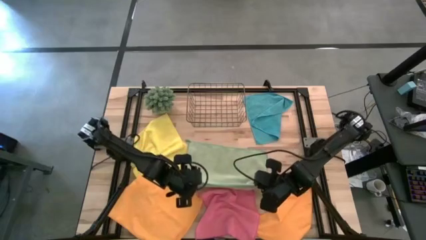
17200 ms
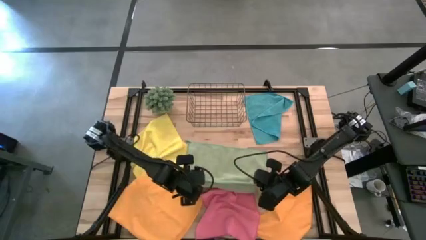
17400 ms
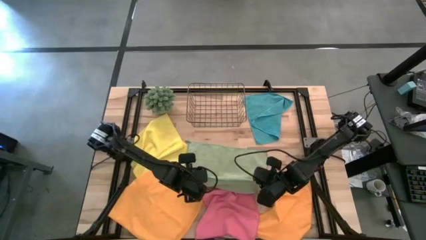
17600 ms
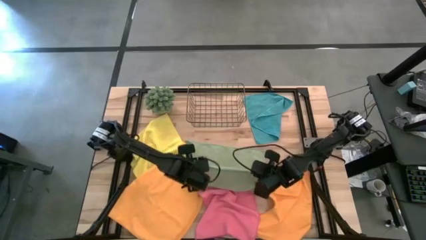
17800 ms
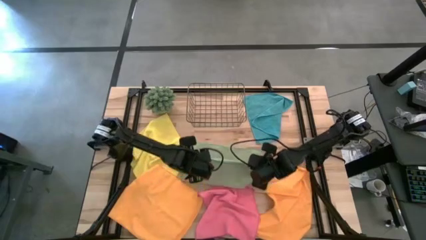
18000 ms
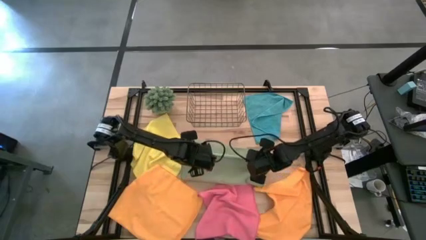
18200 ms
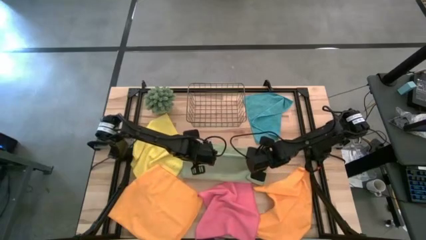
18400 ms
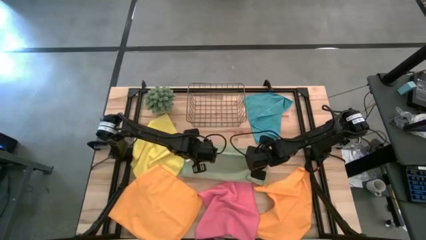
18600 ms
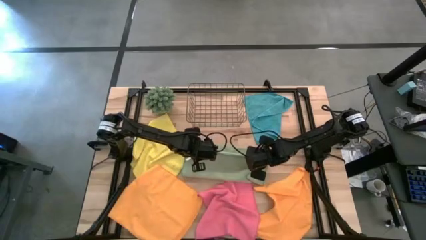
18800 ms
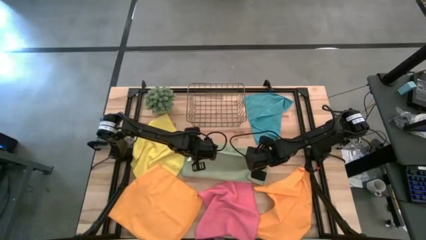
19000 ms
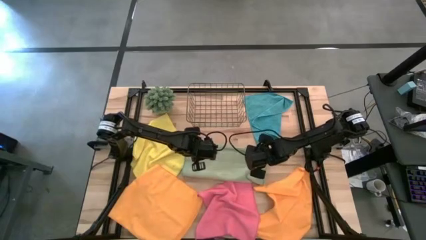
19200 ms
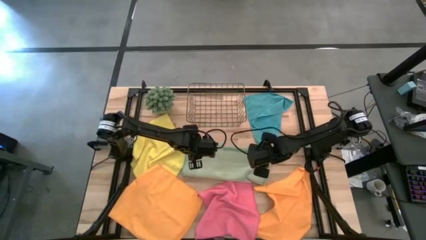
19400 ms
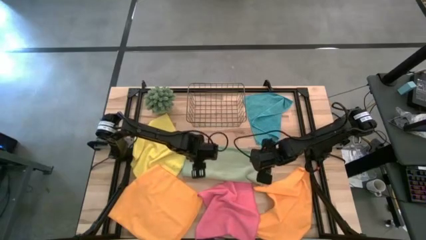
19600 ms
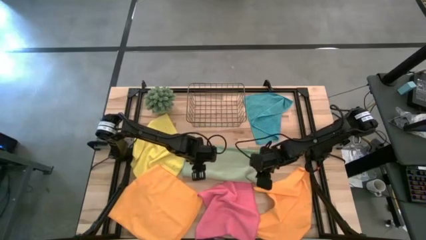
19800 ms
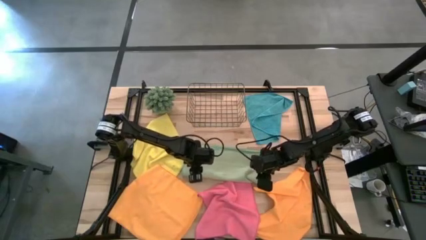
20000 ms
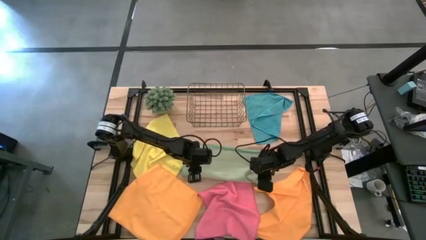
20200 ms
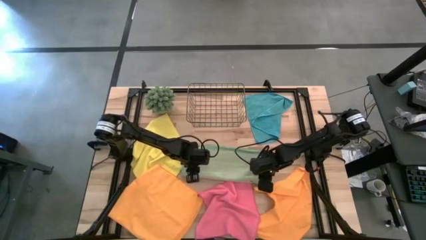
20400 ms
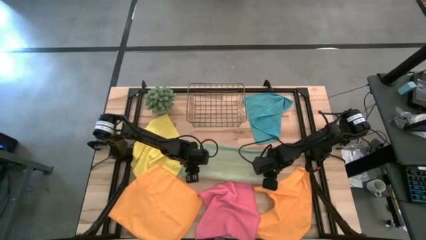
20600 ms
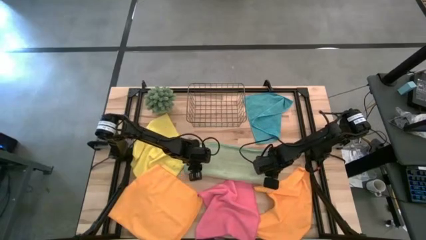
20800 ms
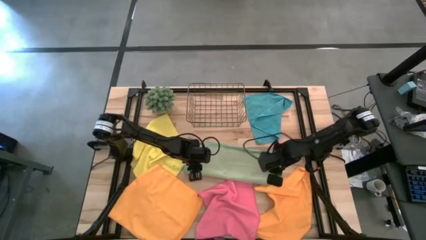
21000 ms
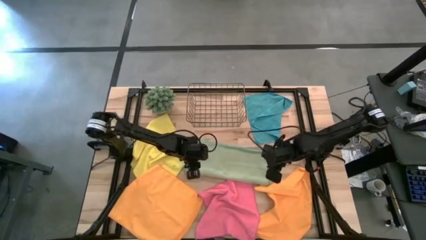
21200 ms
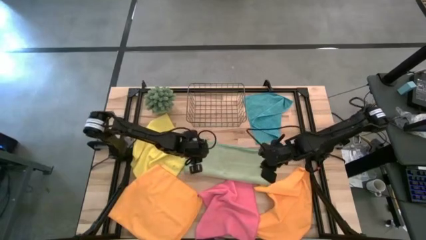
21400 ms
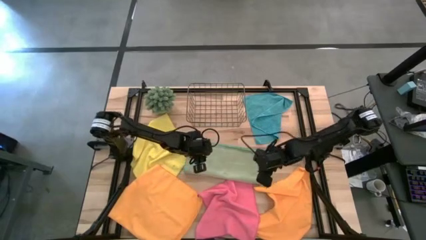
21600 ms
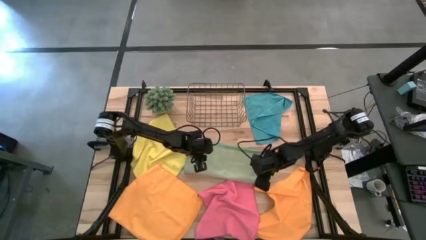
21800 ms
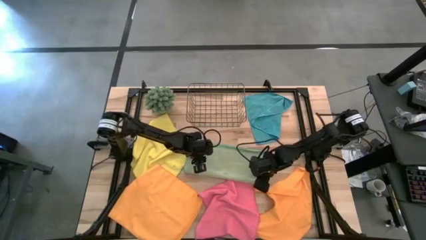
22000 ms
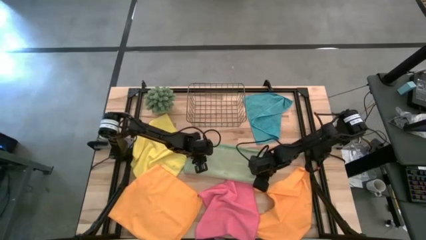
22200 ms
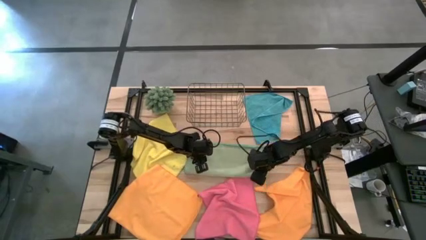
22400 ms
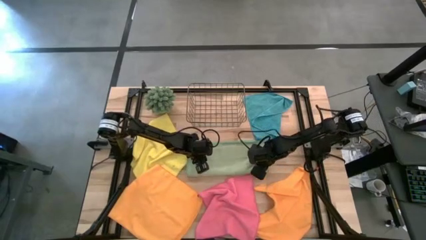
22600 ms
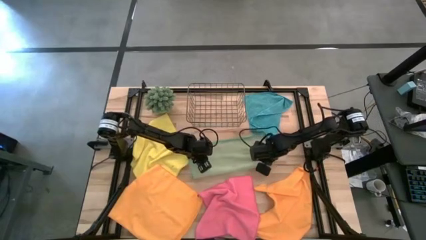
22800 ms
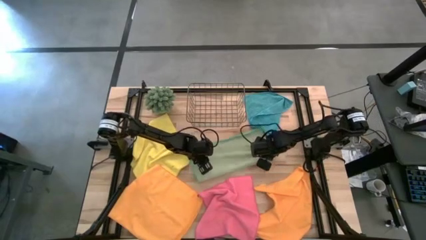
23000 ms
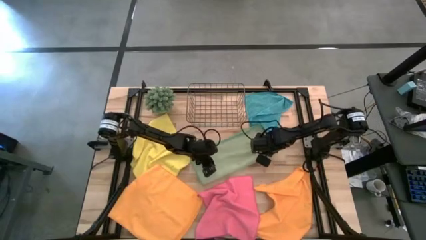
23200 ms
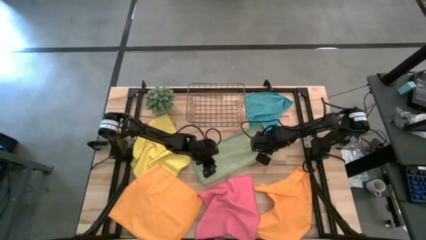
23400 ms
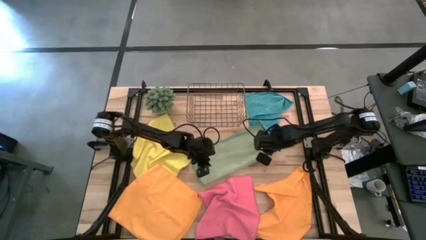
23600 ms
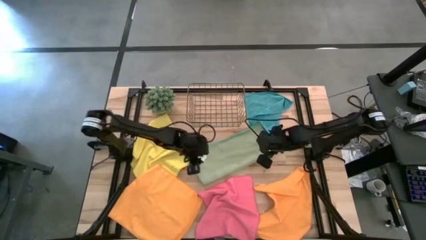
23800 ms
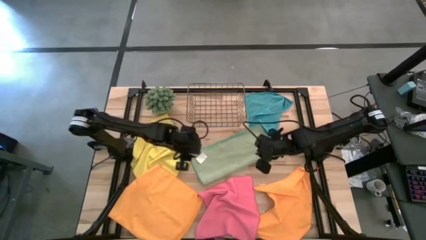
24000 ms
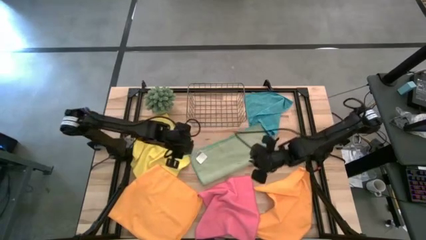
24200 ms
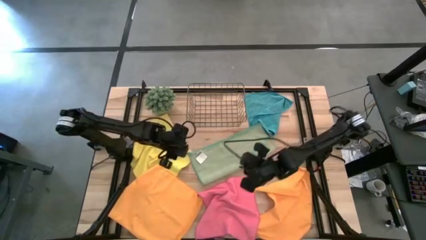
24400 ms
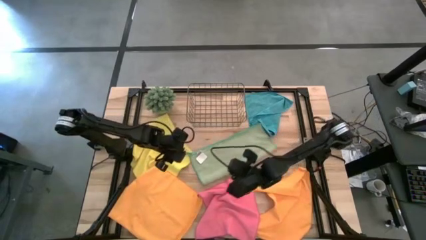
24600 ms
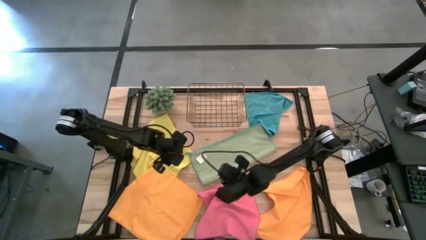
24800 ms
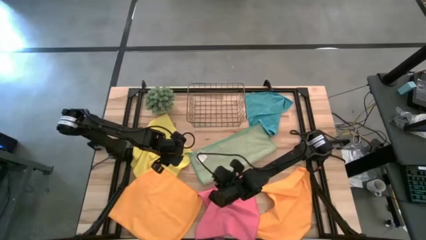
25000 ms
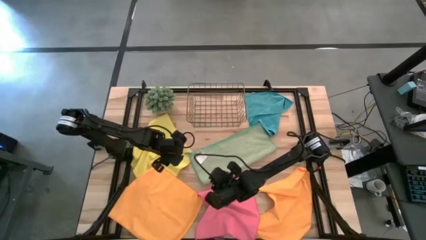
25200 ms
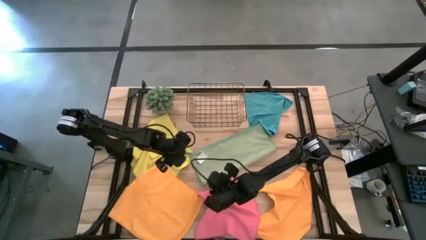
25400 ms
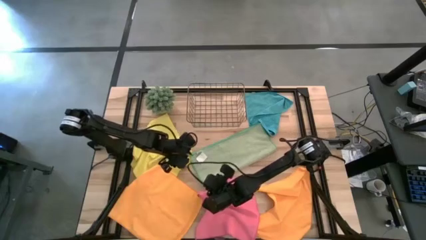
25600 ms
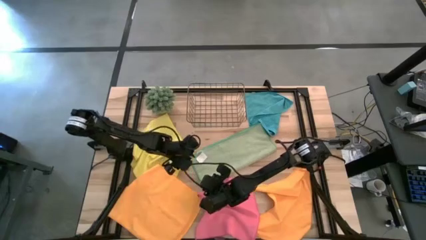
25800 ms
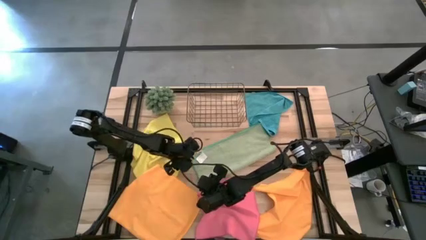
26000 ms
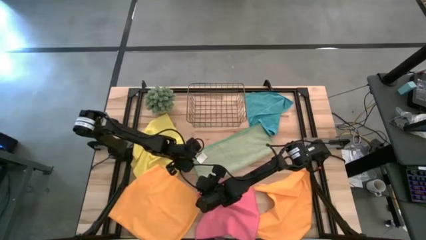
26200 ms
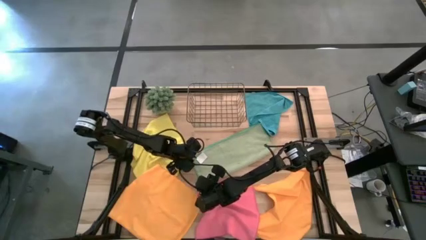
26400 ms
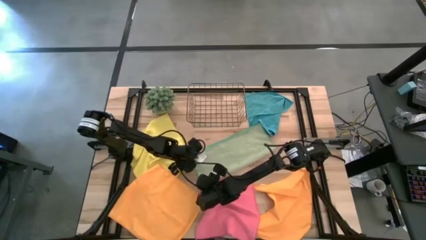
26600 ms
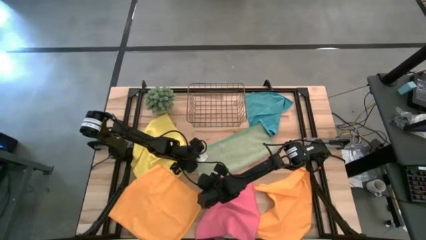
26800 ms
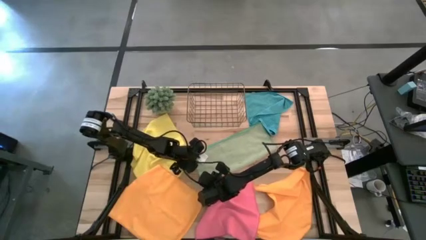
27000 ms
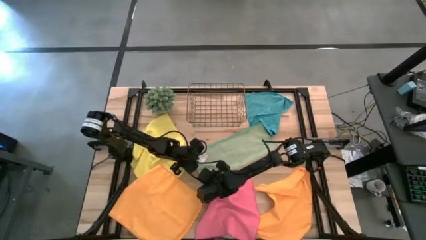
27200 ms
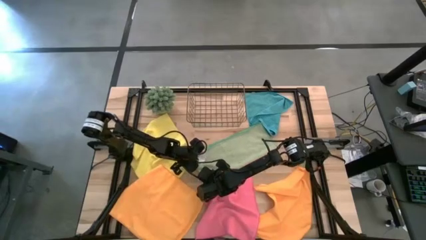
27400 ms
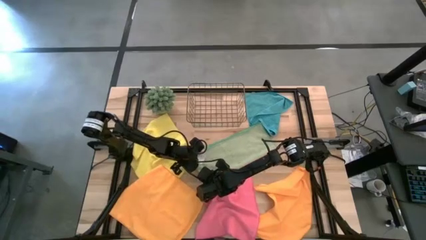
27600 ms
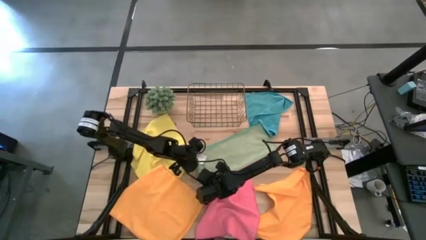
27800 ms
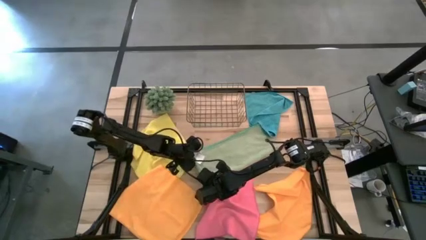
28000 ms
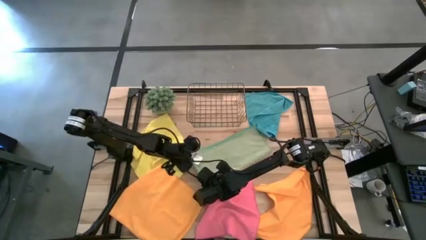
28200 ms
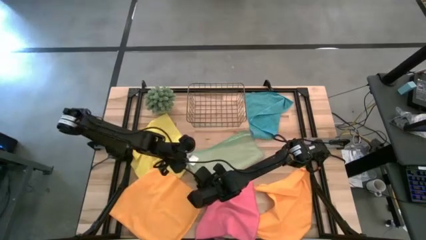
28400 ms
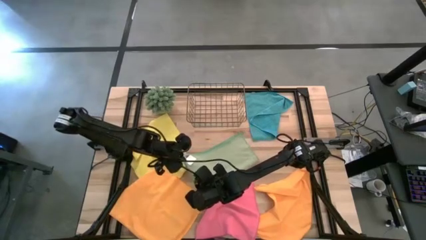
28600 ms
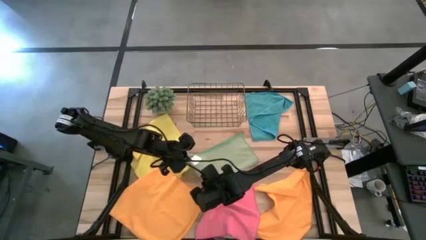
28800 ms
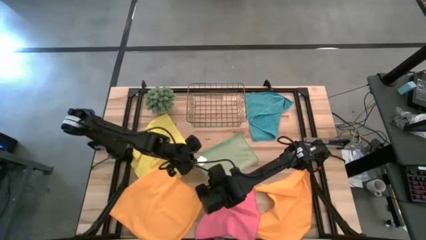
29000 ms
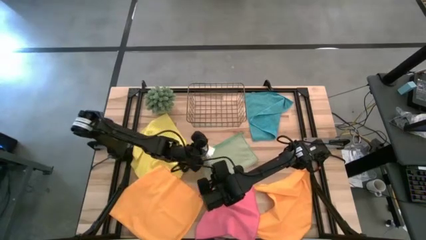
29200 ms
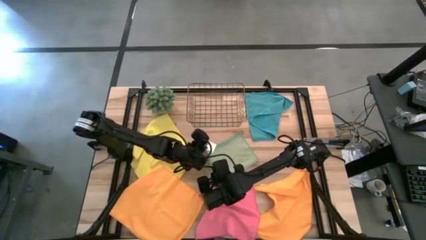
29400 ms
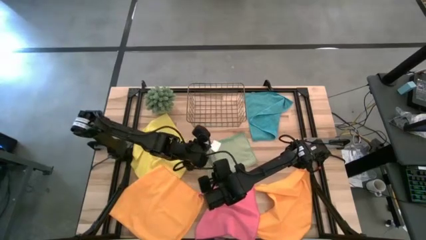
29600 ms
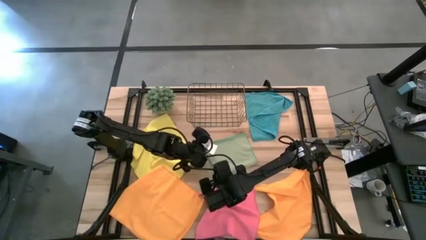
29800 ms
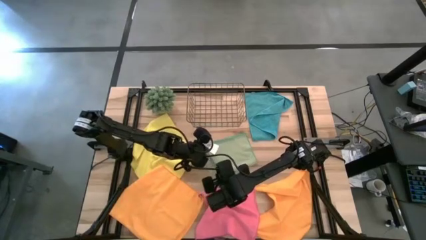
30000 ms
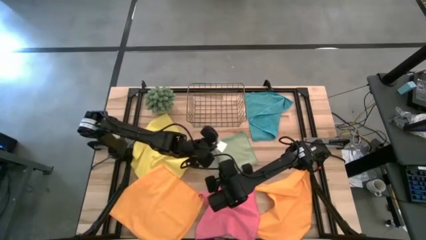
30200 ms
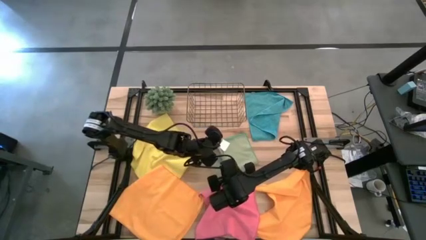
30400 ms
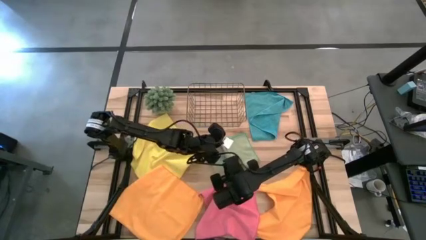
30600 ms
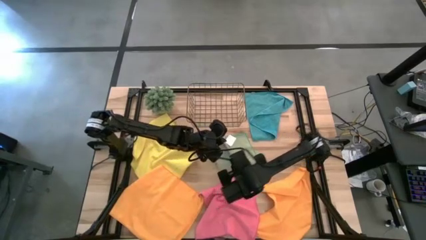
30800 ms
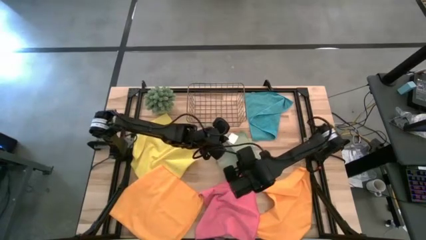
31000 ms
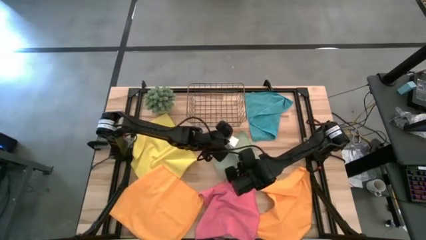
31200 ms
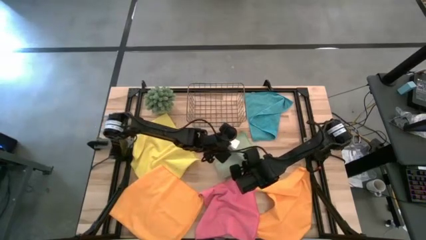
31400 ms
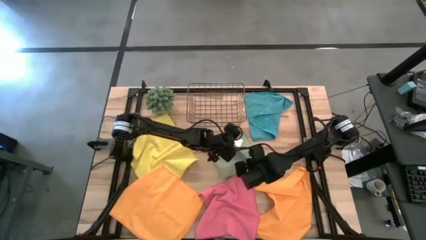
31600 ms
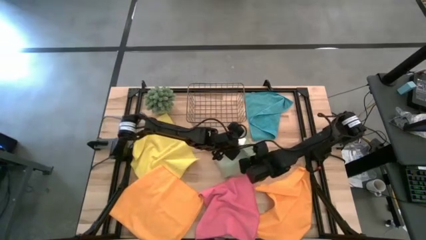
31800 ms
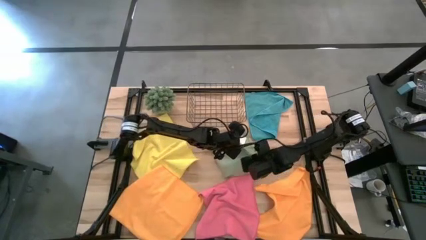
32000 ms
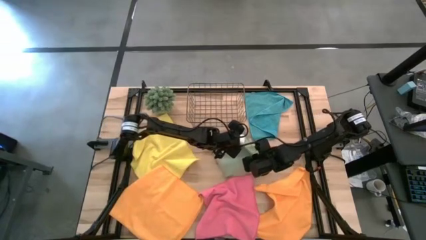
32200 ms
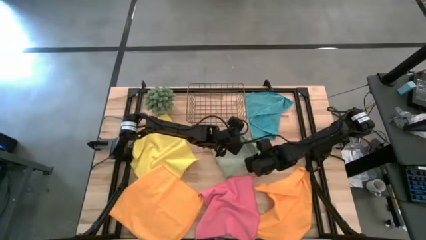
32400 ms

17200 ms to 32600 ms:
Task: Fold microfiber towels
Fold the green towel
